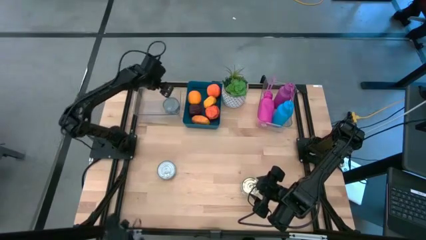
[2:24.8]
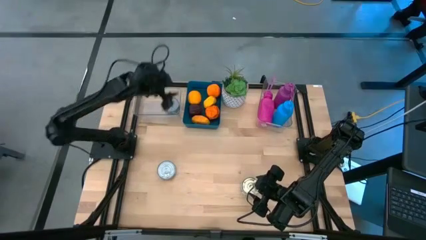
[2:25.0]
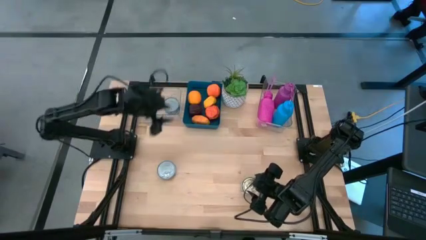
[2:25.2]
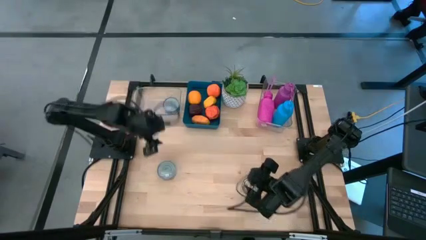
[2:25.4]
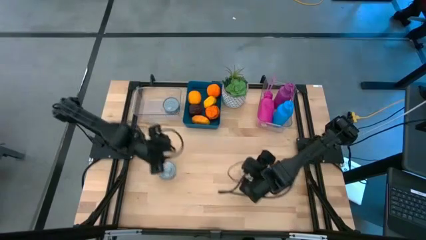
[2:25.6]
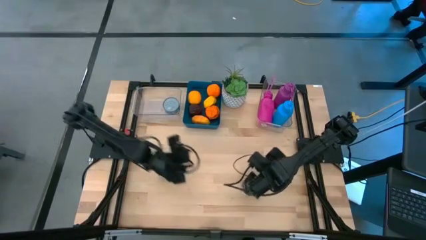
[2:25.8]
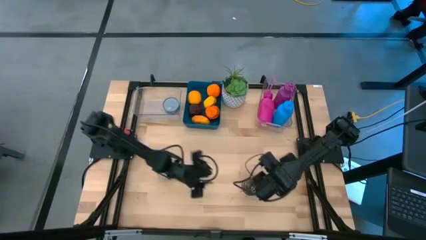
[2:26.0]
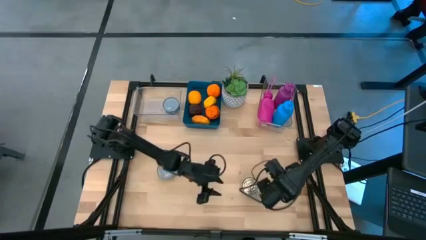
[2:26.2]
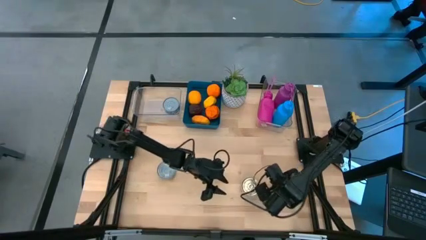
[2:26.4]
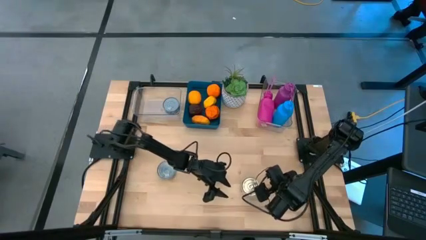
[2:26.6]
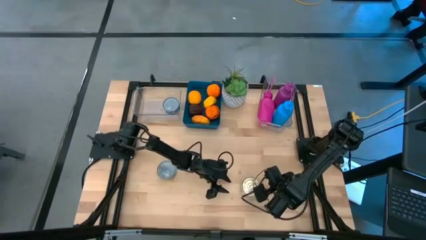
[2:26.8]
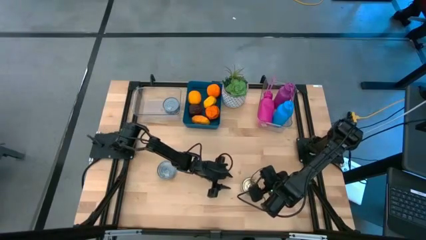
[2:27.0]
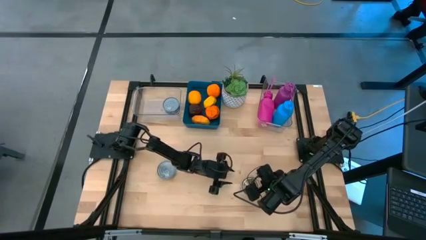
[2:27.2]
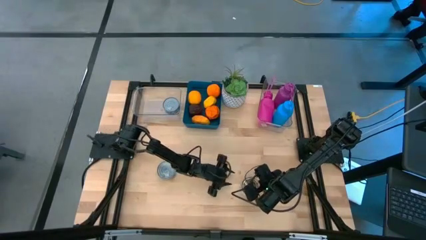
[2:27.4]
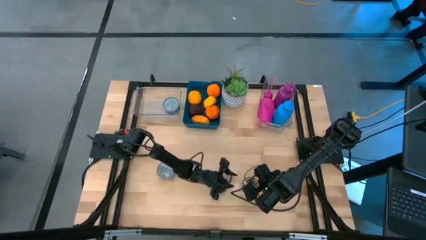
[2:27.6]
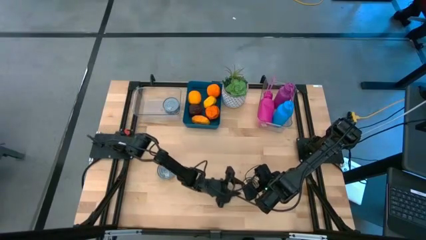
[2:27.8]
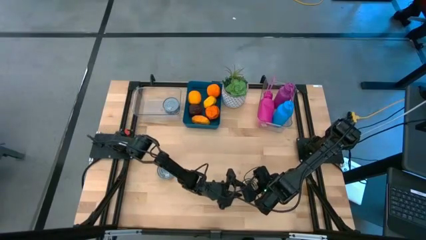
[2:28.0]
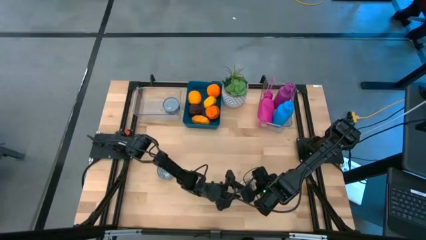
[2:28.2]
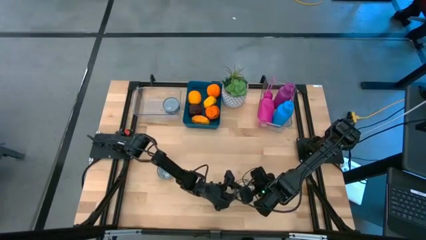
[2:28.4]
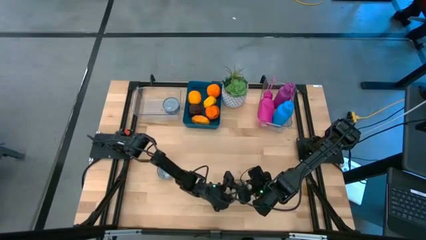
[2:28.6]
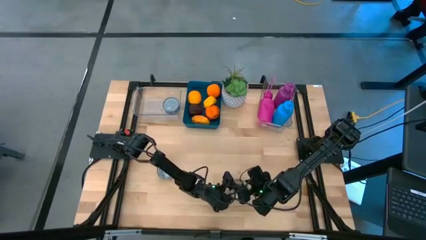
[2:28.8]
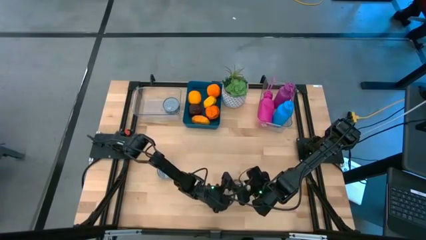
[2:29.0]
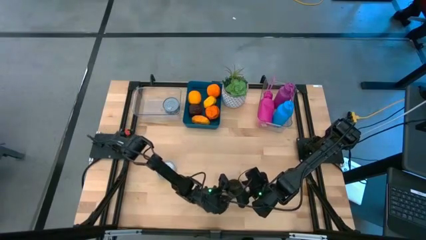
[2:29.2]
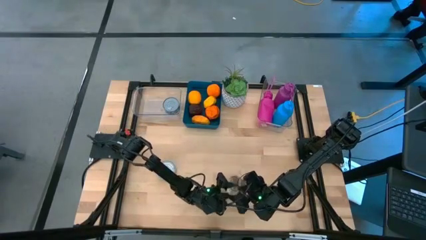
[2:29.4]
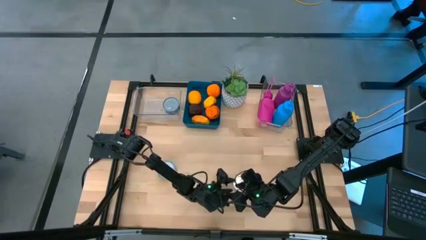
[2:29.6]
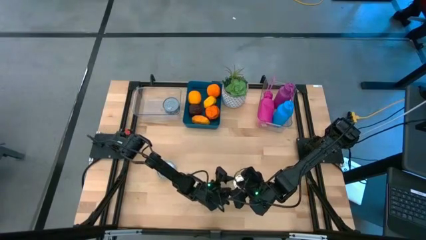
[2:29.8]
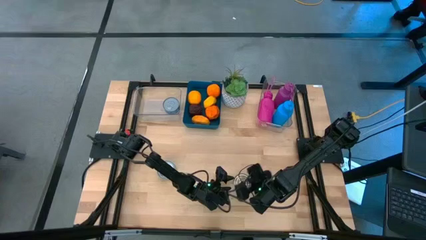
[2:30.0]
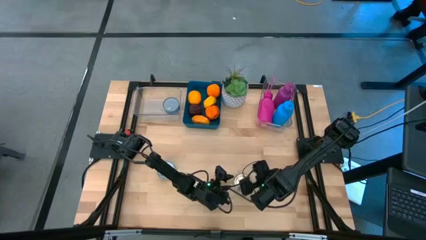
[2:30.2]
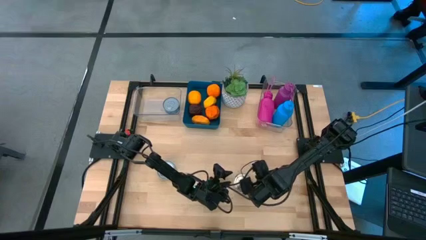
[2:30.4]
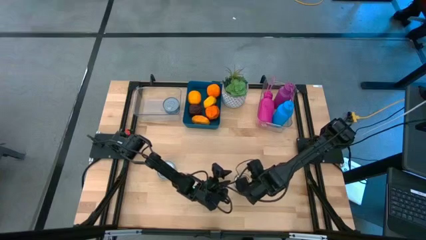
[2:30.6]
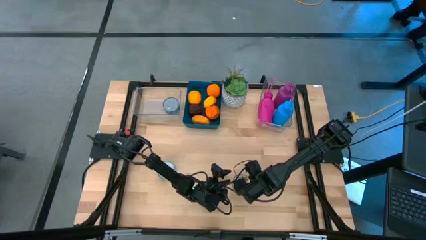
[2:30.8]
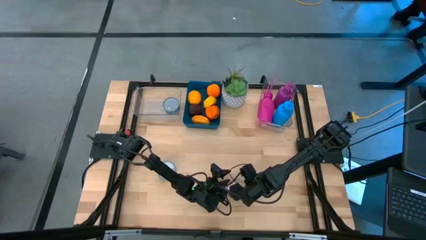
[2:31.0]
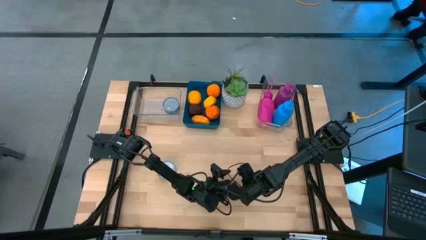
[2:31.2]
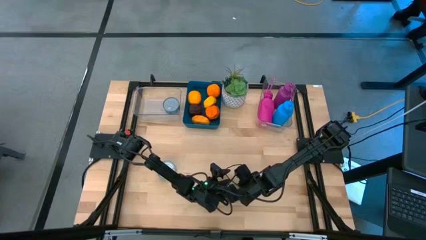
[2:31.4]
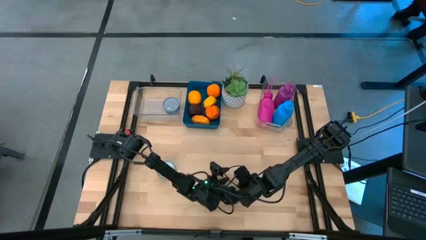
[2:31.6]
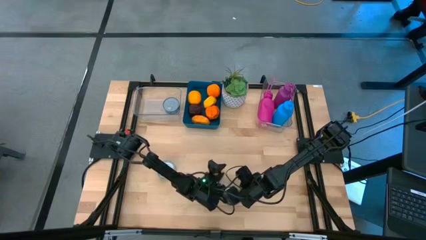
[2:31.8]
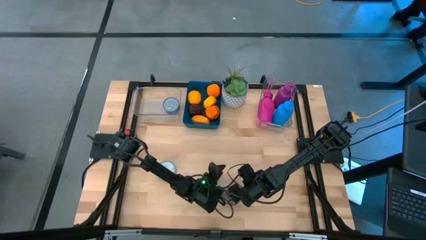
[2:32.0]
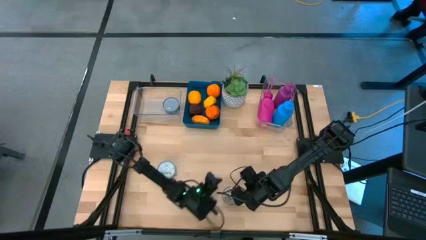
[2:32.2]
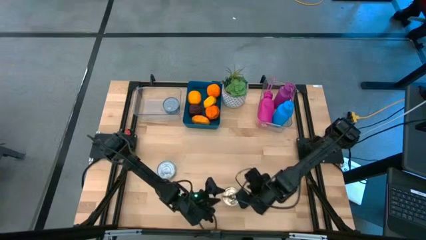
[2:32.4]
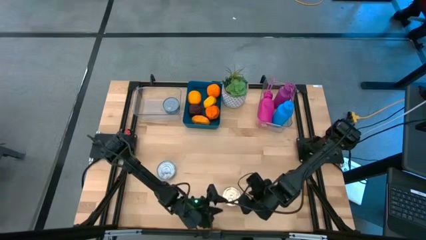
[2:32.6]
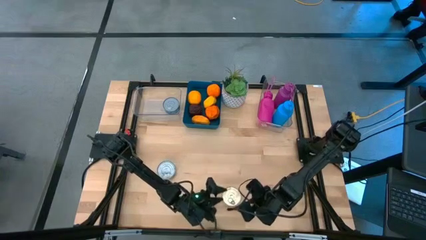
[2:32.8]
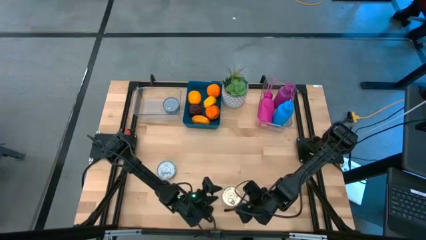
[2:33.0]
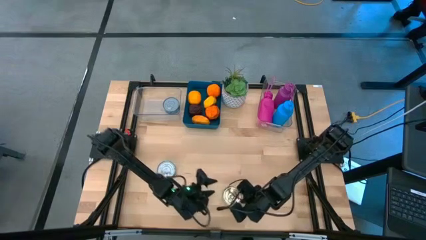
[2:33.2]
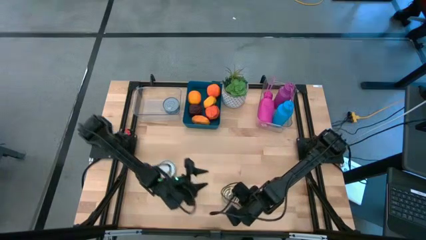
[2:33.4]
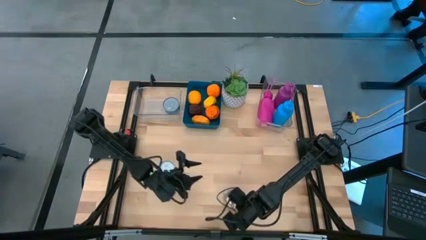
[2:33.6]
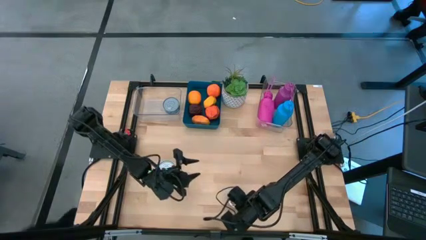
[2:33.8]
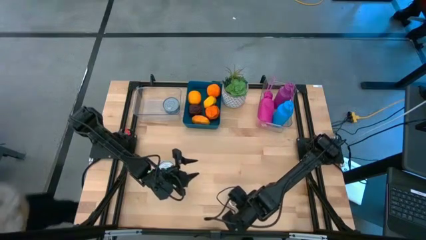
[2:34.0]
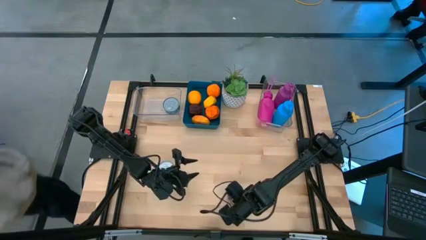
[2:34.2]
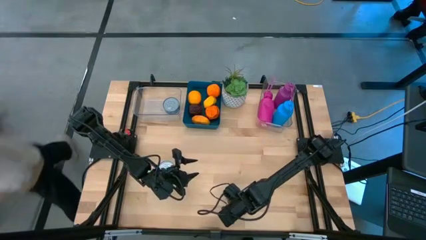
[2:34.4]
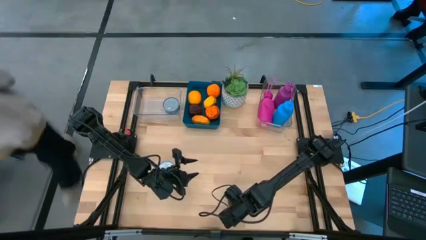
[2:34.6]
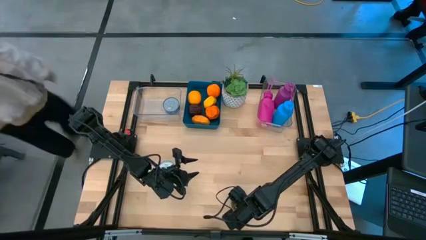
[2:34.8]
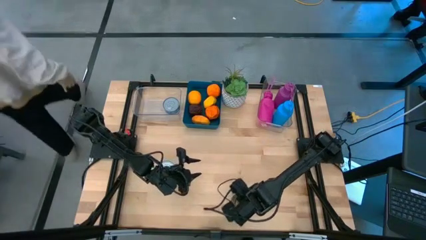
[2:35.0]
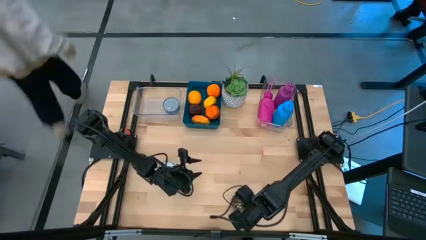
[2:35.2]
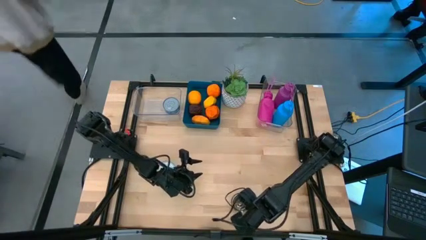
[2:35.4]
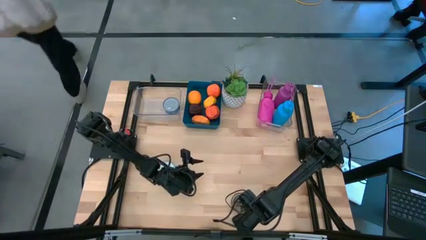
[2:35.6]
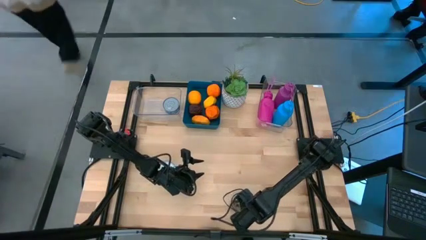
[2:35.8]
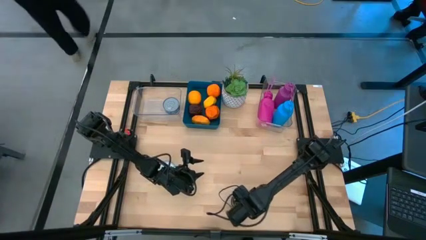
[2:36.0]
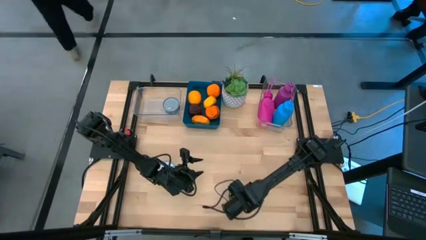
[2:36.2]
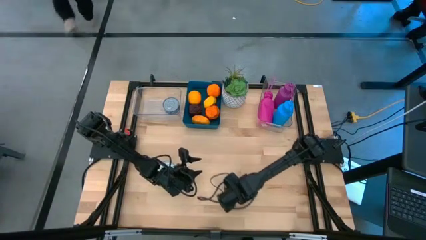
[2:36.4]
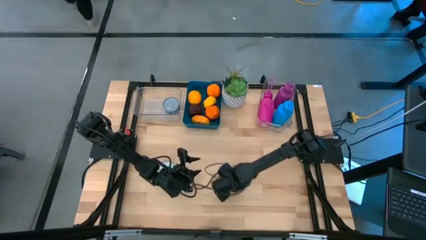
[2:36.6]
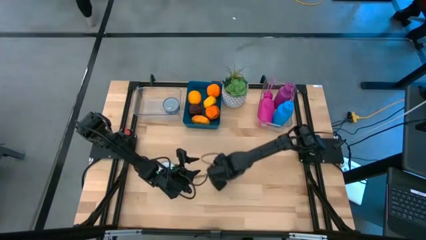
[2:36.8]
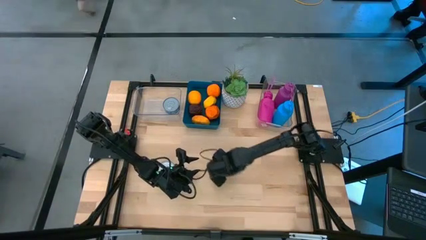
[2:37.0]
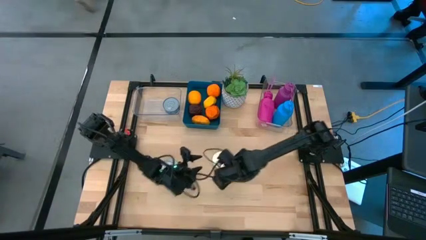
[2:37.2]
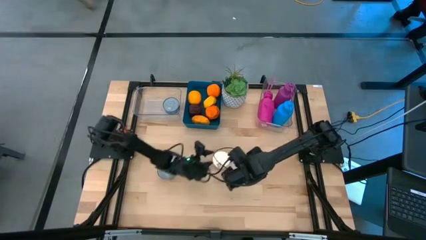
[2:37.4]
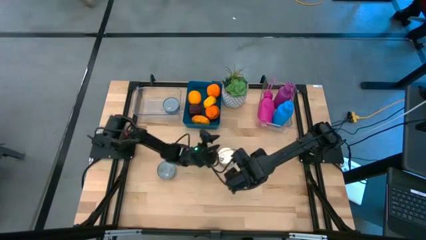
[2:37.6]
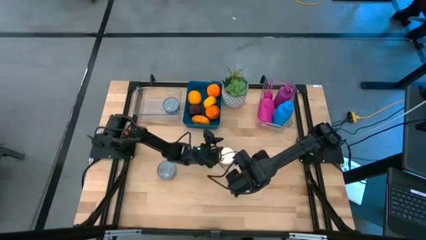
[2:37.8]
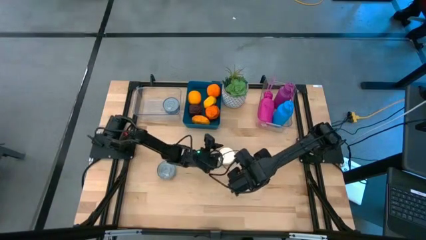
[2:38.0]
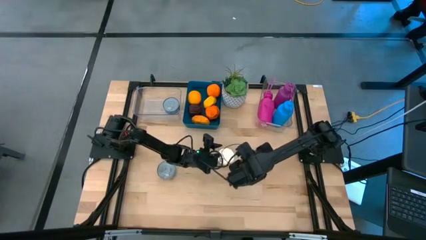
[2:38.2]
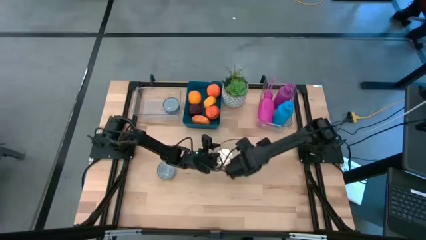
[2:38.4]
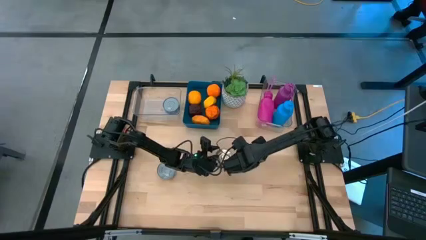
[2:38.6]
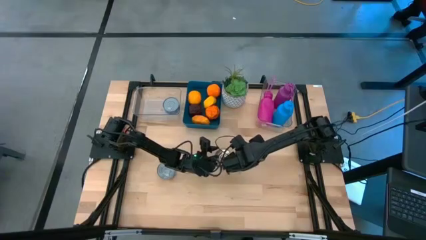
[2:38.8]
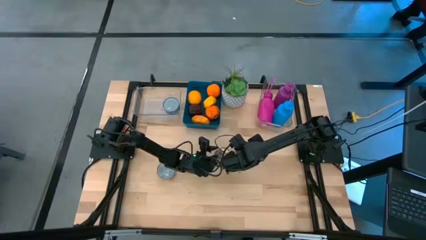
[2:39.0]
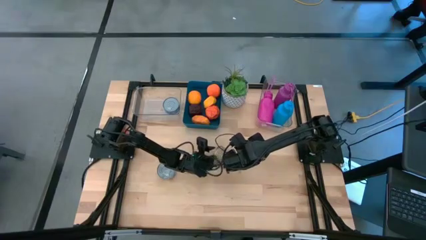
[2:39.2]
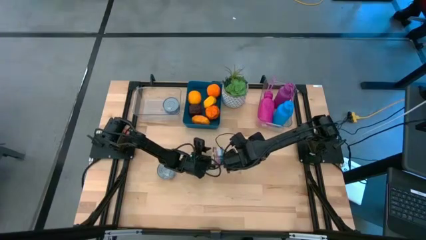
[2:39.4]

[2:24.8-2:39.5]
Task: Pick & Place Food Item
Stack the blue and pink tuna can on top of the blue tuna can into the left transparent bin
